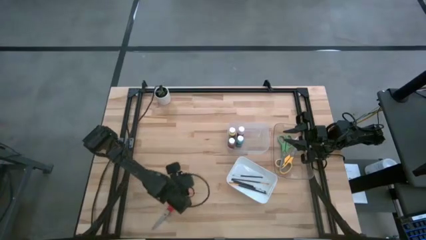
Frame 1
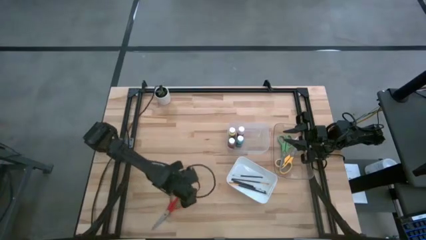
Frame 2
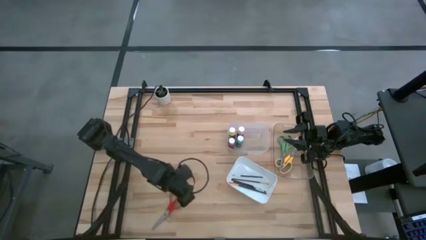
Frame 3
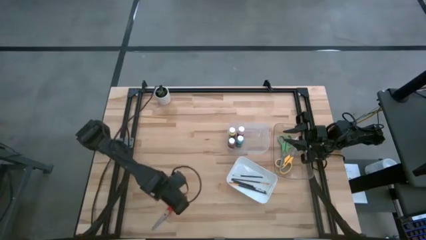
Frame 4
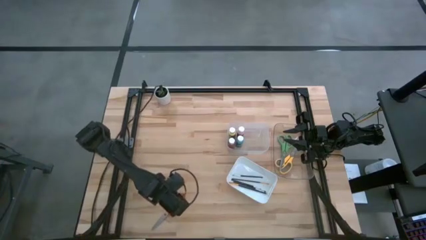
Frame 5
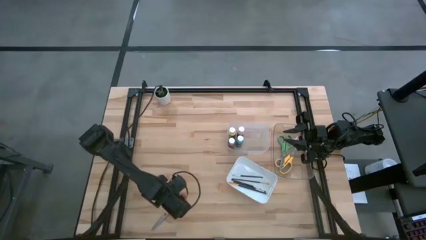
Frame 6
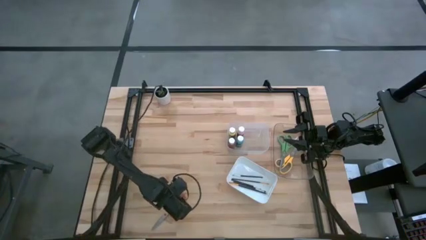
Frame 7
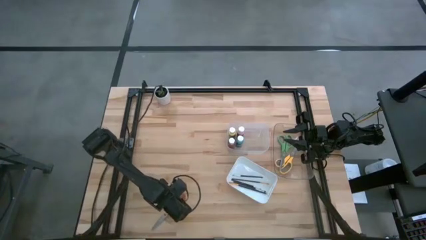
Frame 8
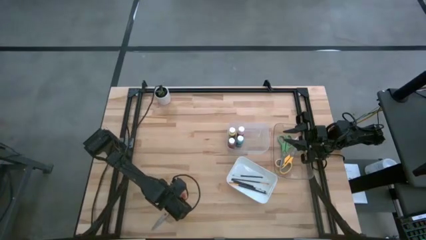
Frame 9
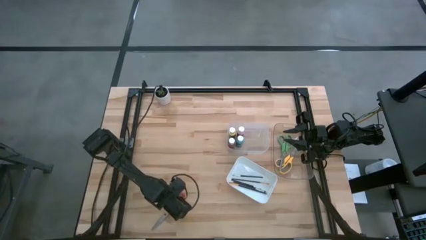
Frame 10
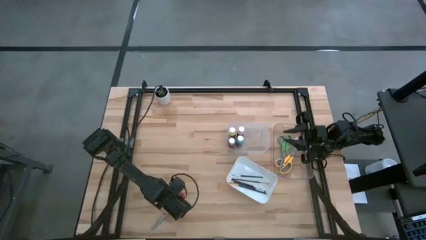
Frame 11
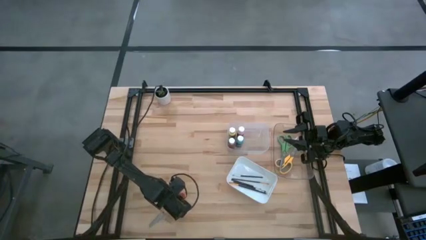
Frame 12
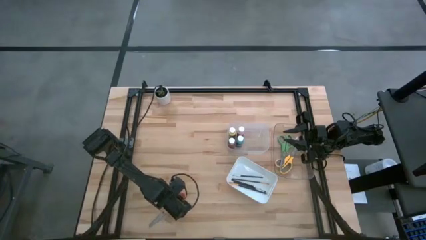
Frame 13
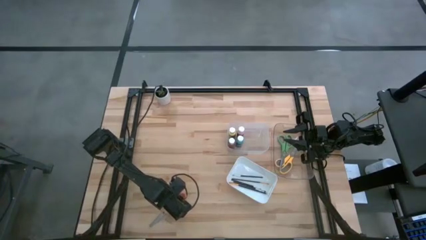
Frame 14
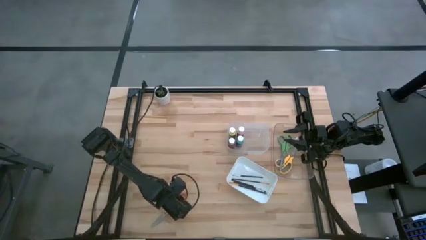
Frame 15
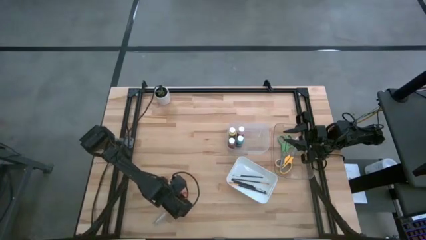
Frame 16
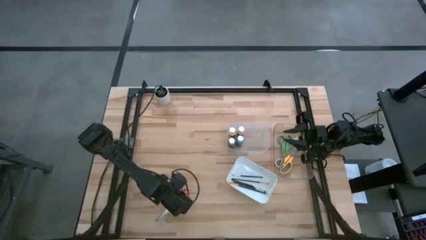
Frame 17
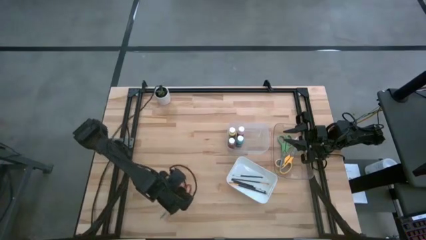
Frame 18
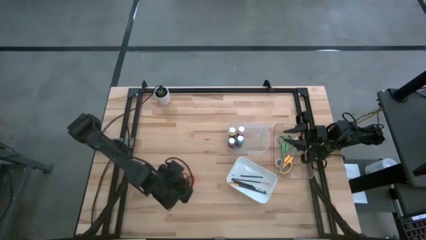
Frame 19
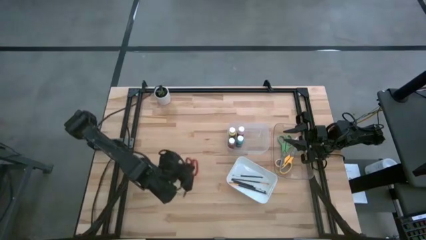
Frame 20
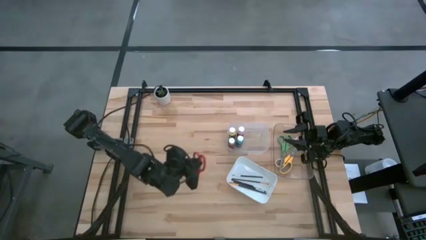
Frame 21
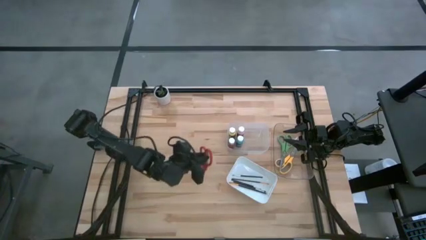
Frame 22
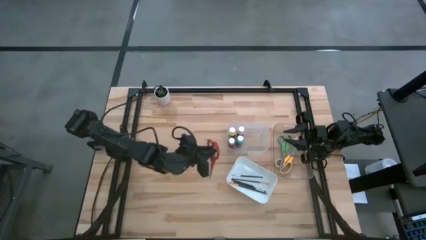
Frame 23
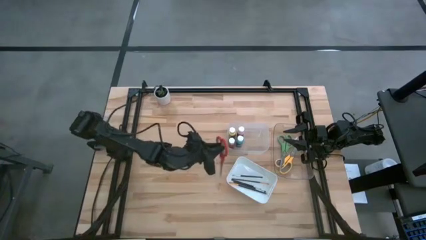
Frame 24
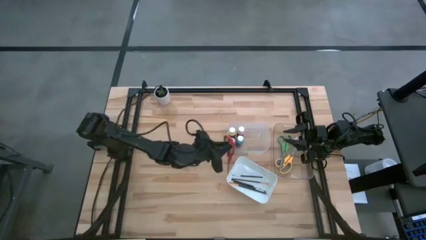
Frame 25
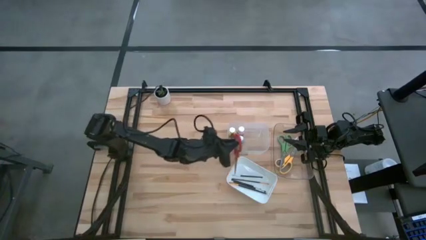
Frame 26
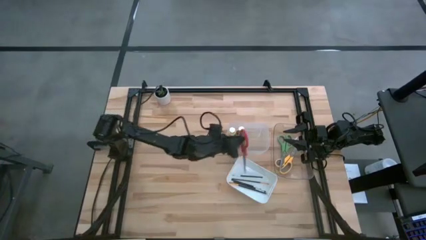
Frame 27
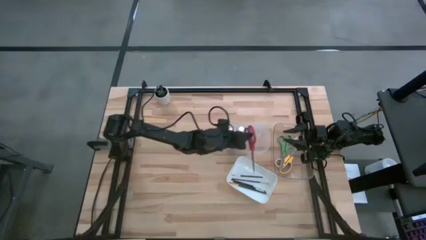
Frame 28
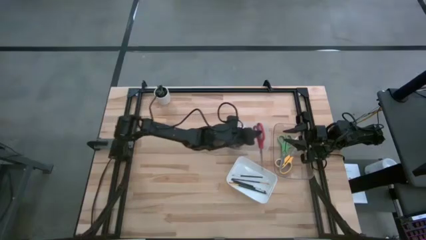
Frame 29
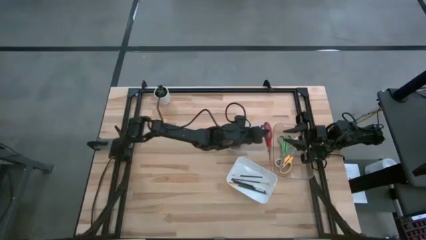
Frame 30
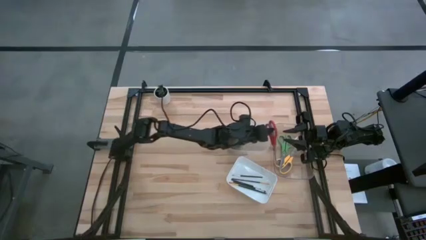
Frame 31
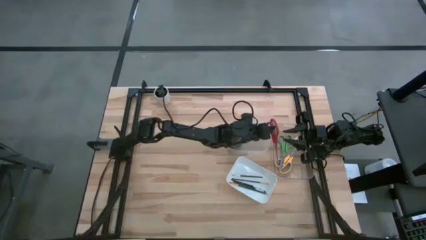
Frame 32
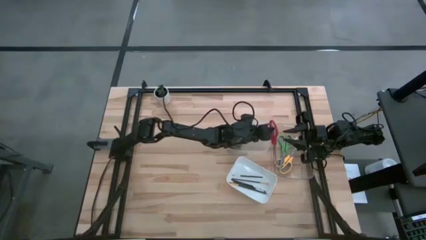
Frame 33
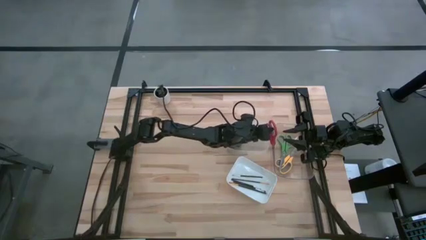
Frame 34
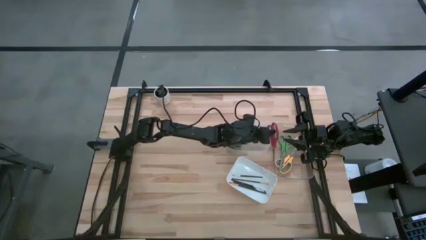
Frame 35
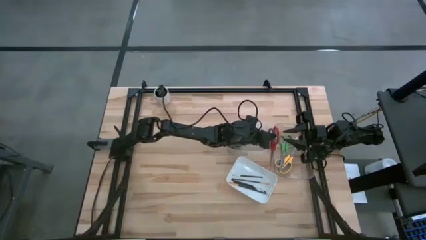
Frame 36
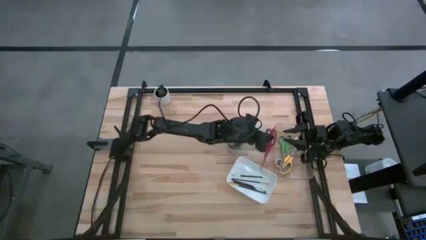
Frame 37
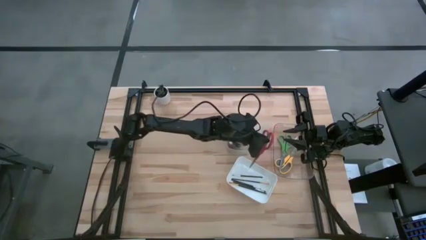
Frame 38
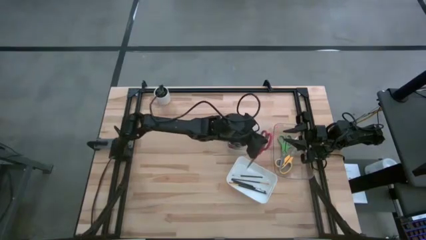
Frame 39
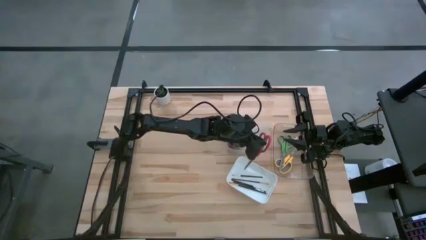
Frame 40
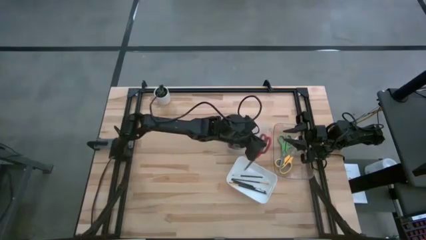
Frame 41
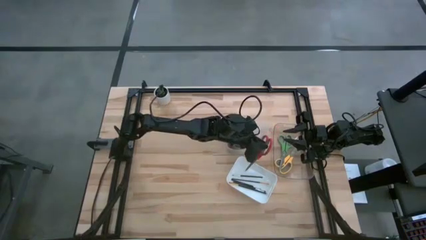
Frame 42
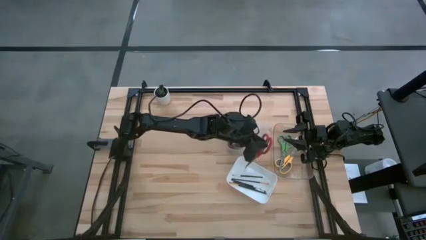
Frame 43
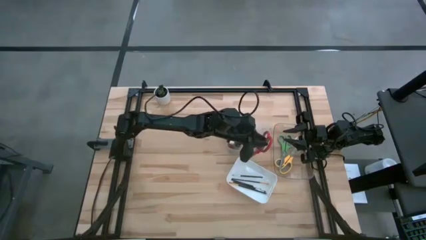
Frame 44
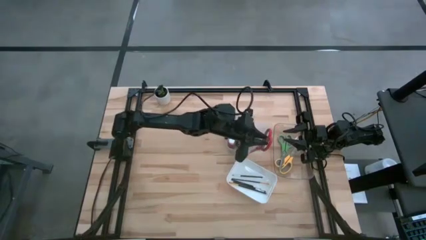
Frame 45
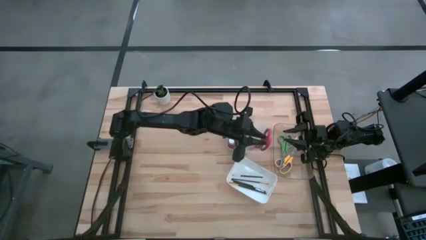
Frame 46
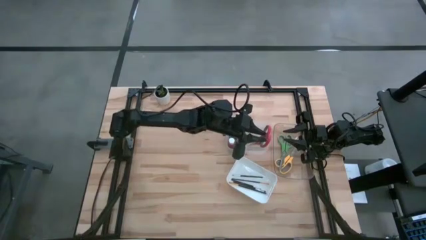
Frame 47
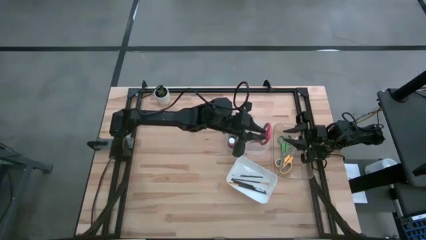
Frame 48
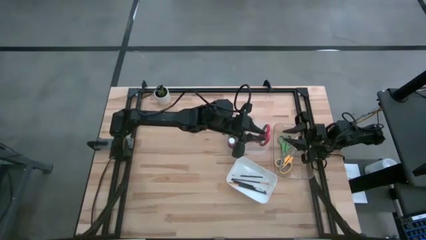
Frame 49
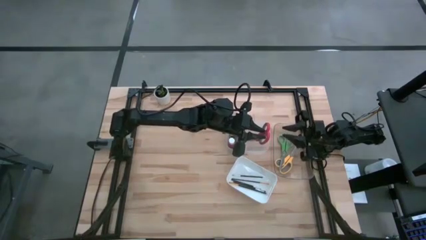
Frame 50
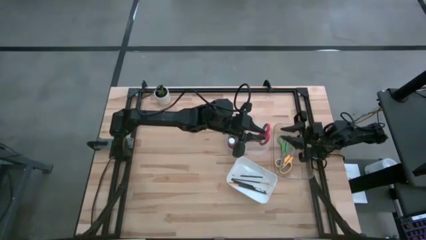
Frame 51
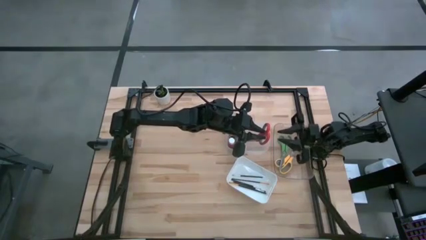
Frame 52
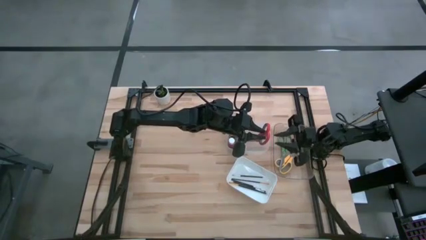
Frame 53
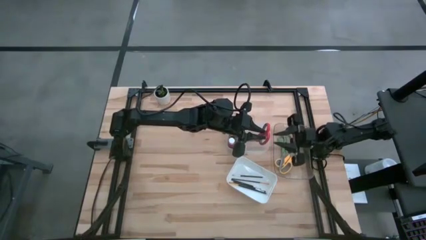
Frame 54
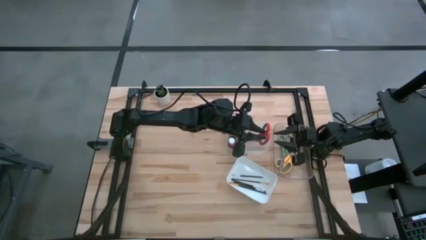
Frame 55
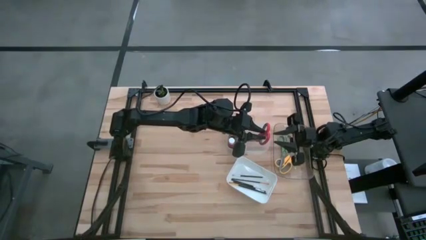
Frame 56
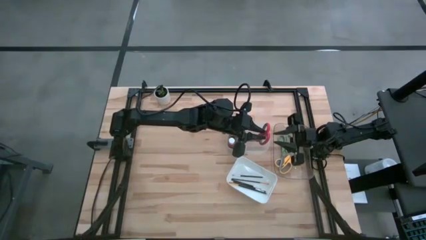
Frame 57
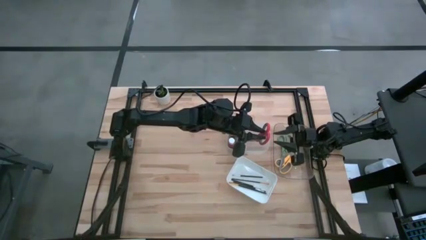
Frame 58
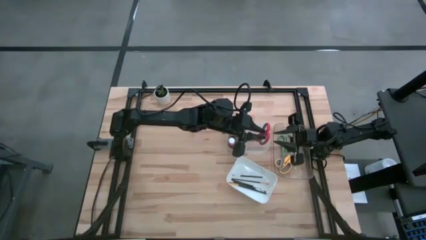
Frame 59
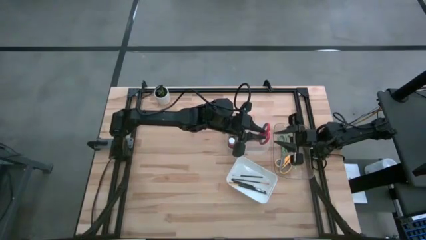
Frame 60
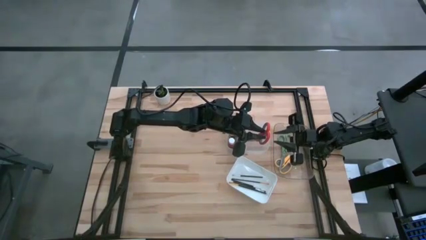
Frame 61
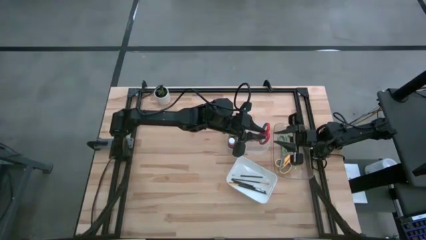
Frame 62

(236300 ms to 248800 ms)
Task: Pick & Place Paint Supplies
Put the red scissors into the right transparent bin

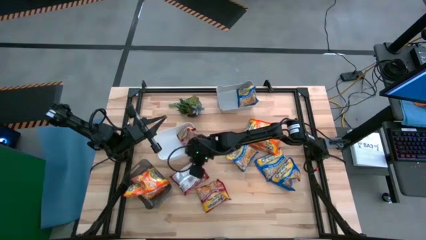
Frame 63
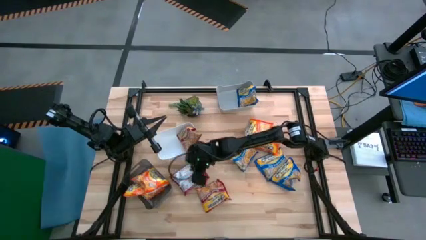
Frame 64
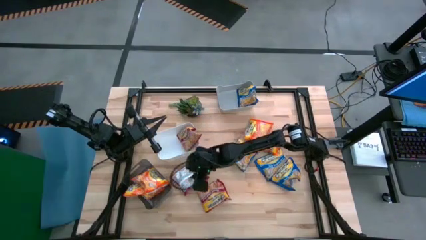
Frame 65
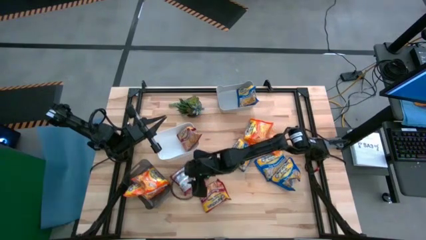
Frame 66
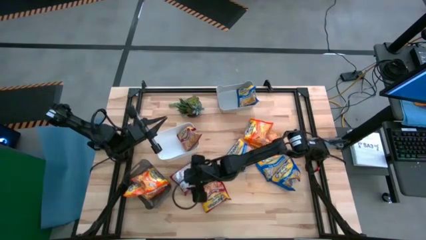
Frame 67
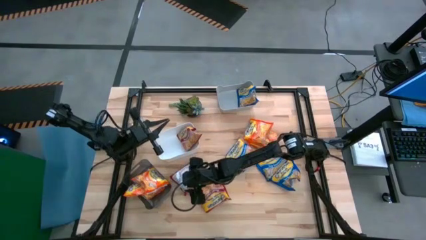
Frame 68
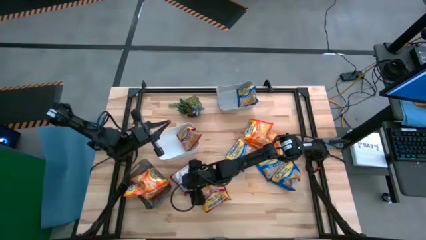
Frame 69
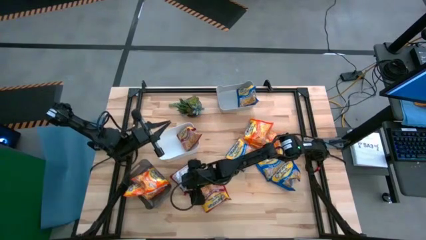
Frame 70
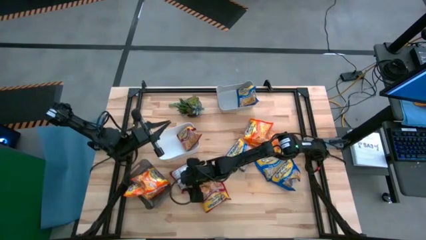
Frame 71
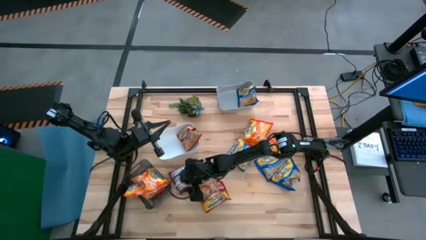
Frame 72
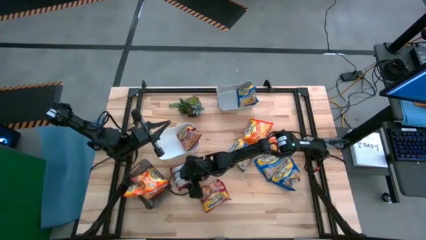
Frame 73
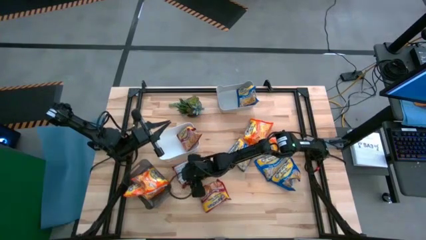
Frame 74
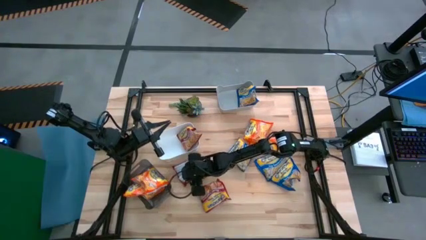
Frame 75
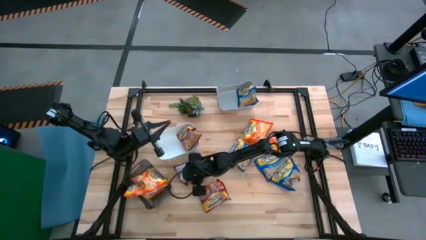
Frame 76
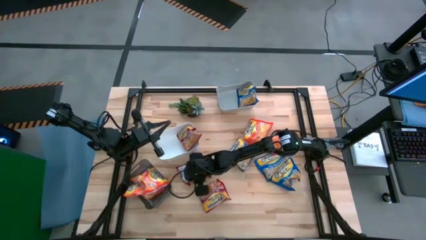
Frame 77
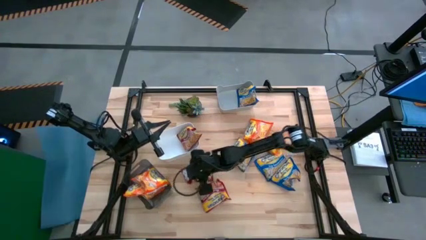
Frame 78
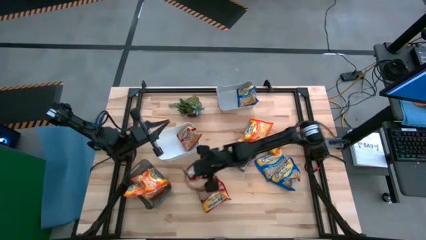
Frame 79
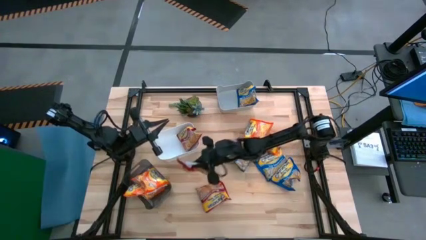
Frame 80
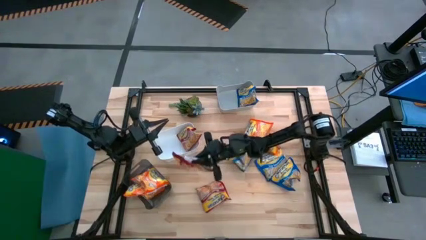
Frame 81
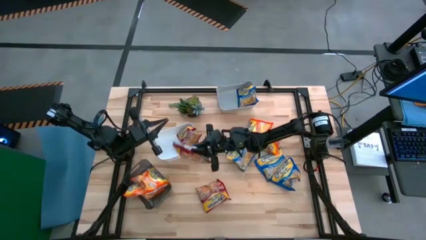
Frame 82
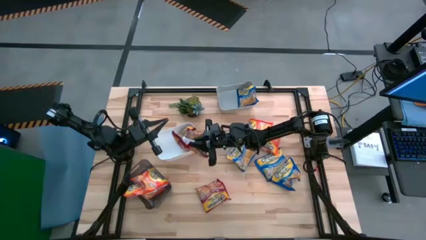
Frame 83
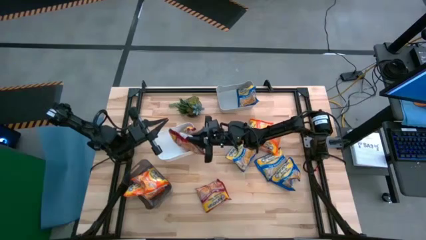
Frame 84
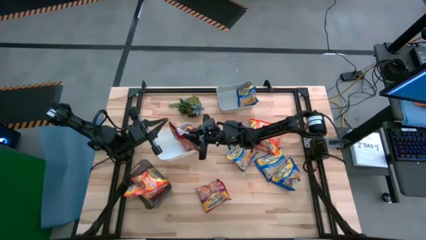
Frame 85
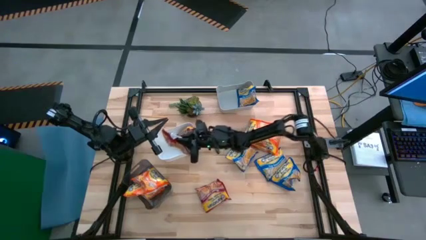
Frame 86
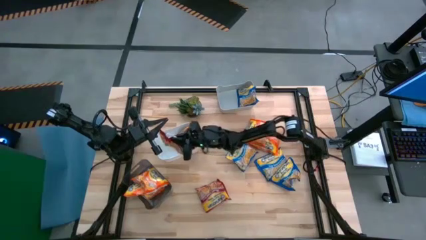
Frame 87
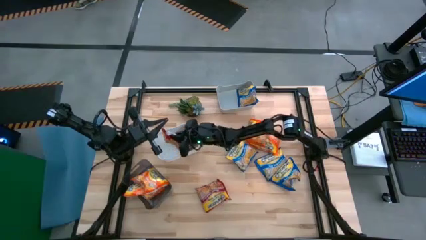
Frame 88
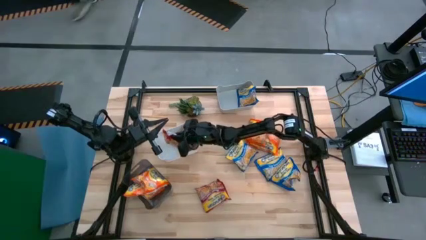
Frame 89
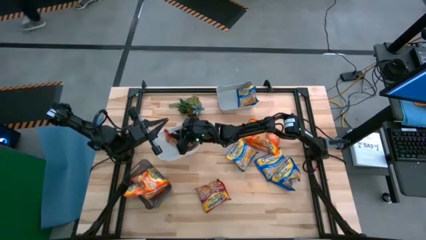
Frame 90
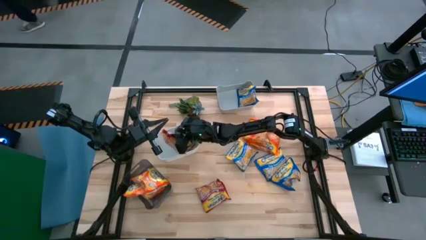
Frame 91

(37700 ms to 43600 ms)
Task: Sort Maruchan noodles
Put the red noodle pack into the white bin
